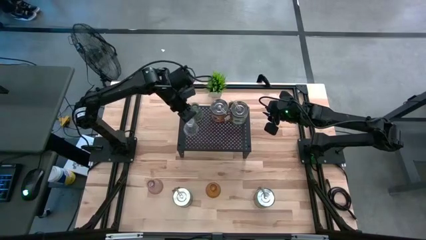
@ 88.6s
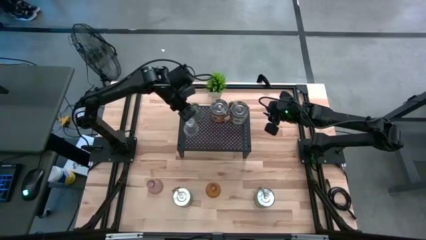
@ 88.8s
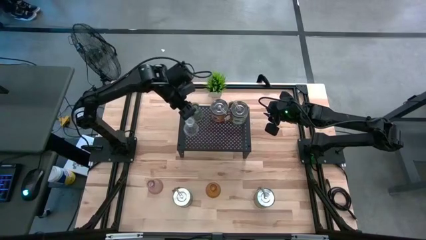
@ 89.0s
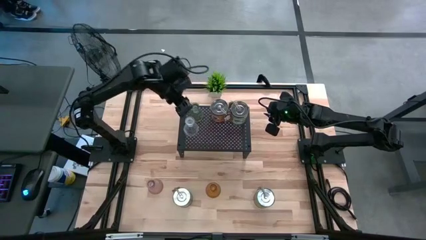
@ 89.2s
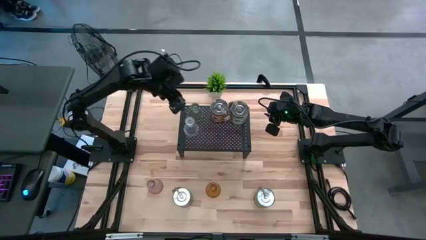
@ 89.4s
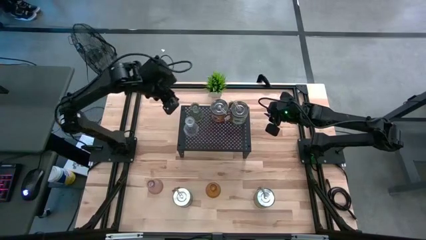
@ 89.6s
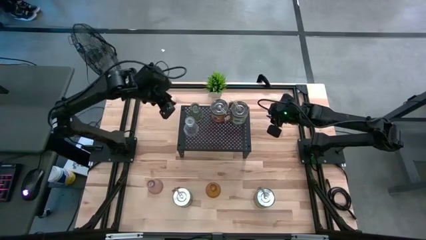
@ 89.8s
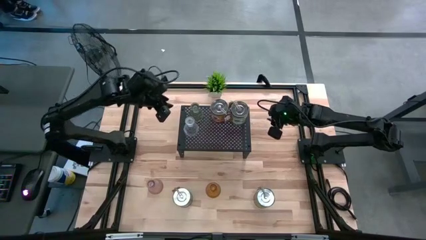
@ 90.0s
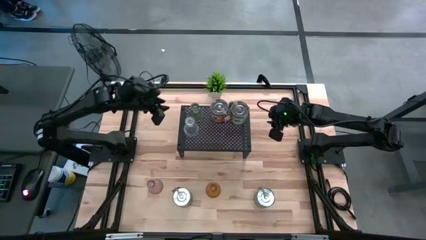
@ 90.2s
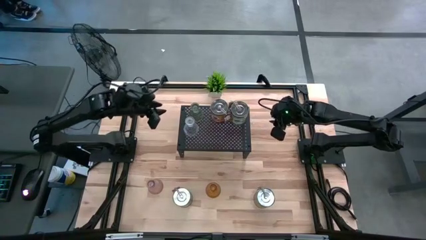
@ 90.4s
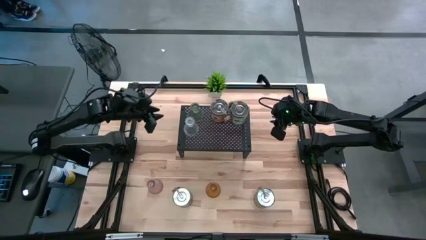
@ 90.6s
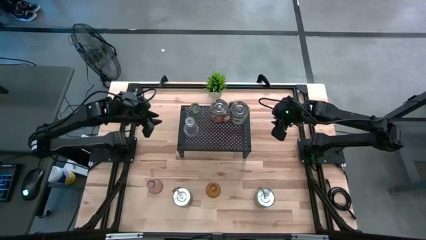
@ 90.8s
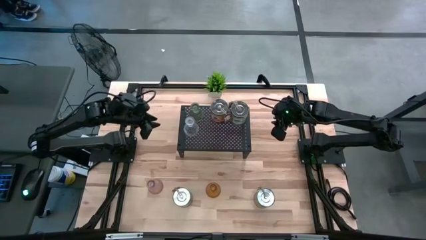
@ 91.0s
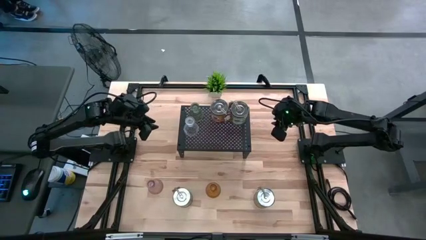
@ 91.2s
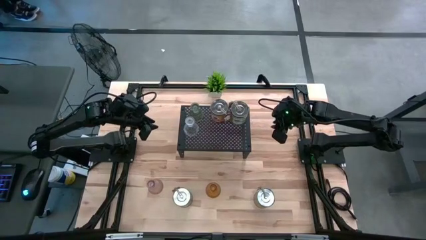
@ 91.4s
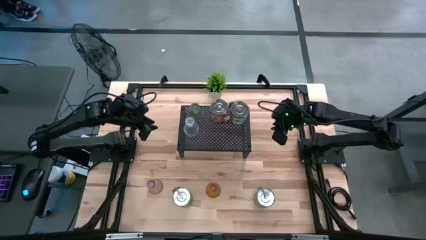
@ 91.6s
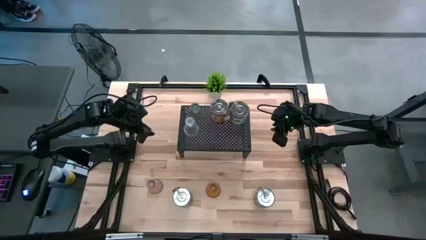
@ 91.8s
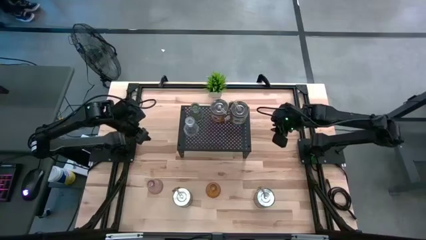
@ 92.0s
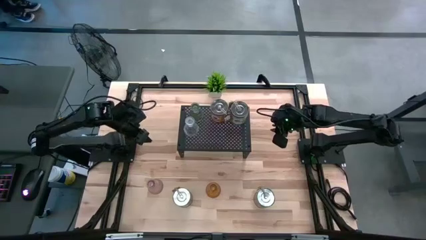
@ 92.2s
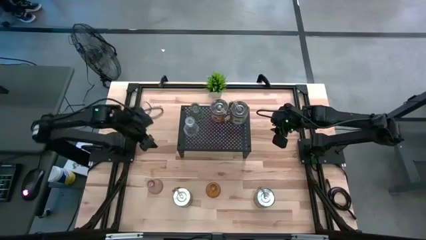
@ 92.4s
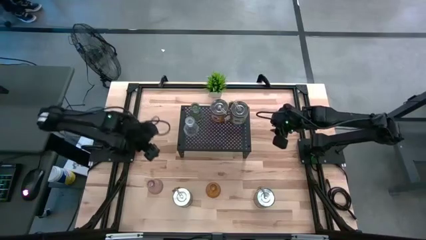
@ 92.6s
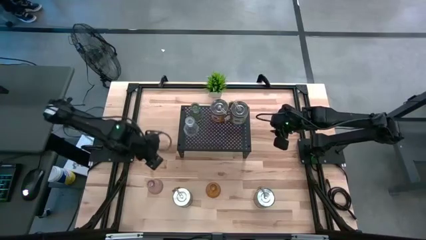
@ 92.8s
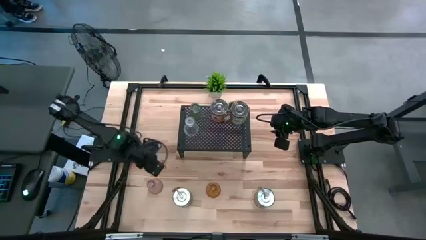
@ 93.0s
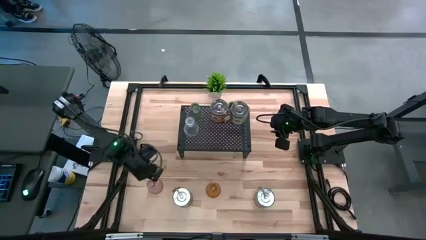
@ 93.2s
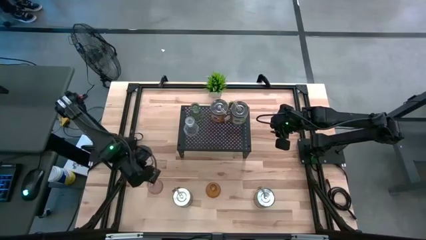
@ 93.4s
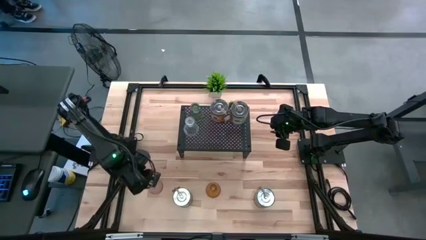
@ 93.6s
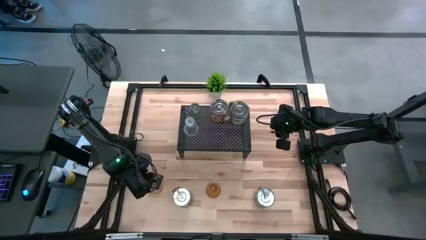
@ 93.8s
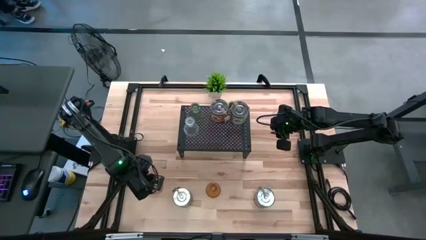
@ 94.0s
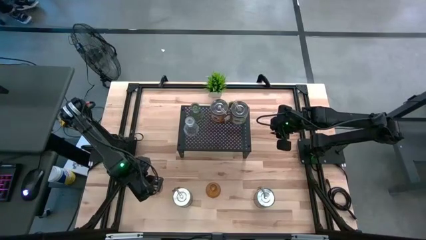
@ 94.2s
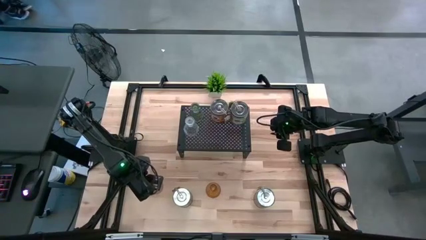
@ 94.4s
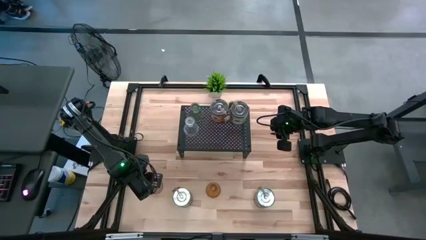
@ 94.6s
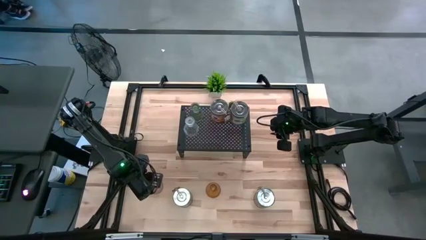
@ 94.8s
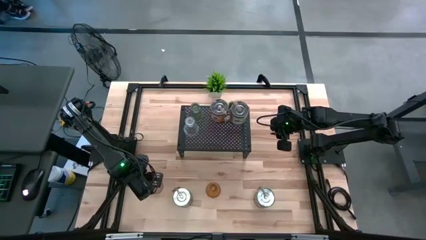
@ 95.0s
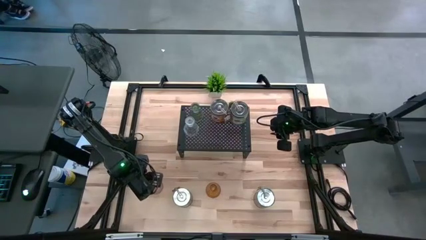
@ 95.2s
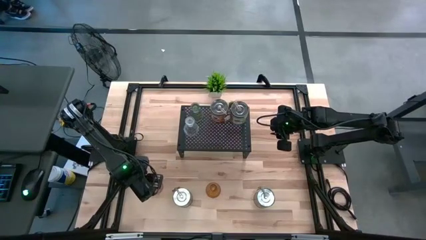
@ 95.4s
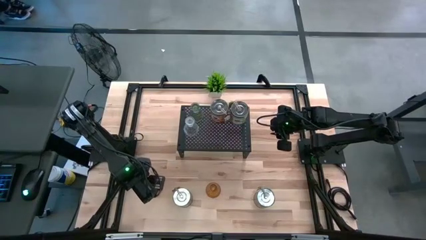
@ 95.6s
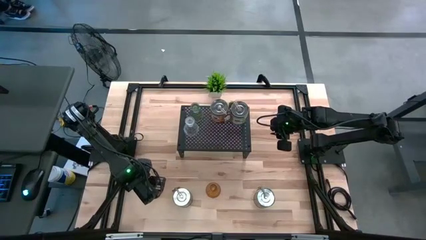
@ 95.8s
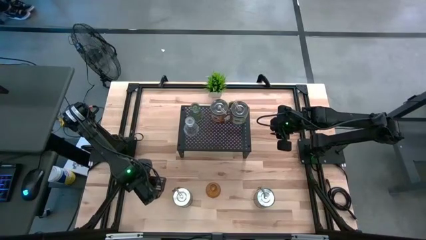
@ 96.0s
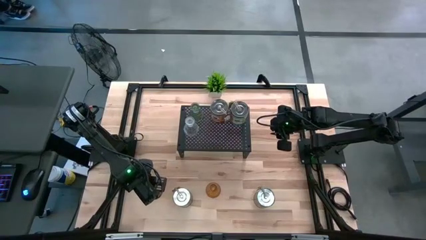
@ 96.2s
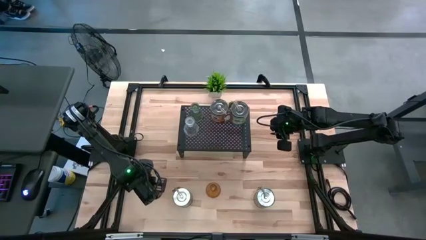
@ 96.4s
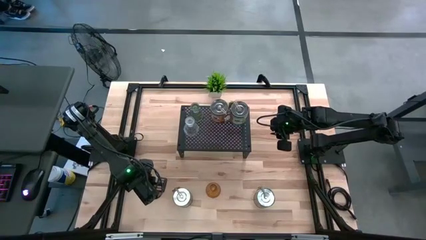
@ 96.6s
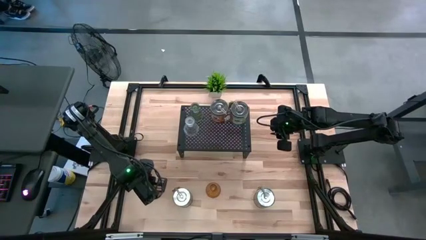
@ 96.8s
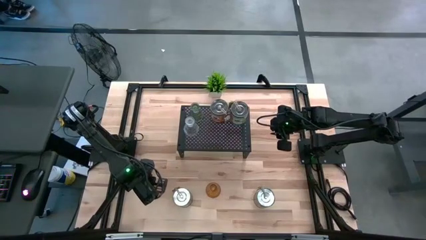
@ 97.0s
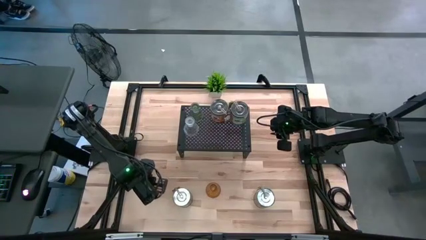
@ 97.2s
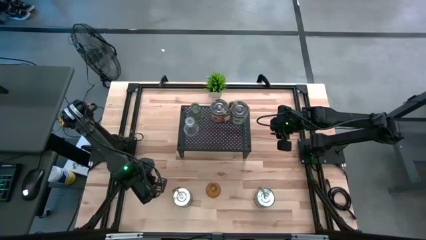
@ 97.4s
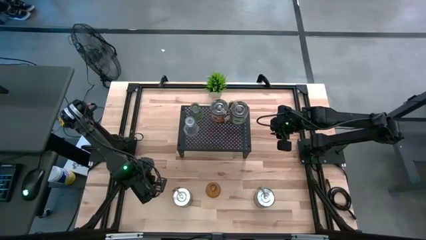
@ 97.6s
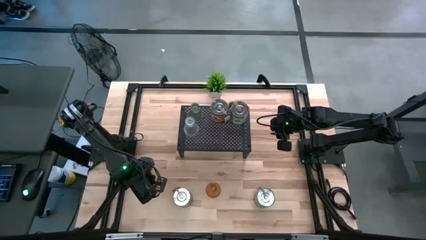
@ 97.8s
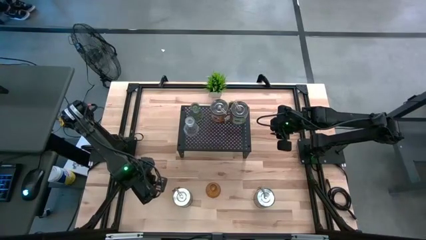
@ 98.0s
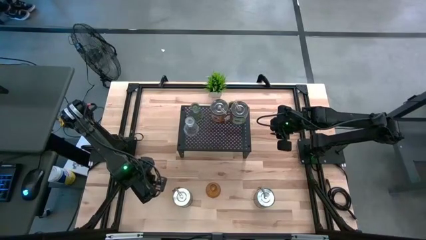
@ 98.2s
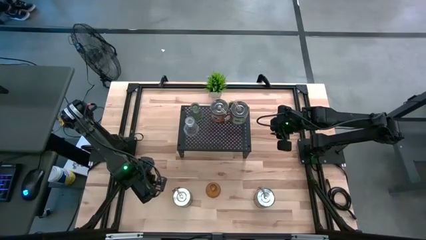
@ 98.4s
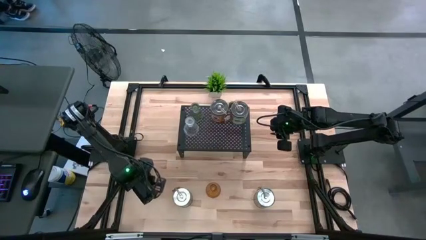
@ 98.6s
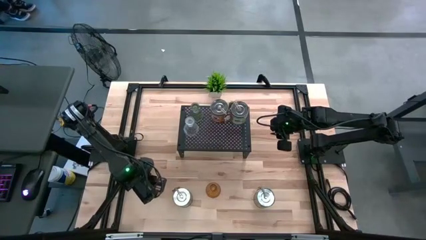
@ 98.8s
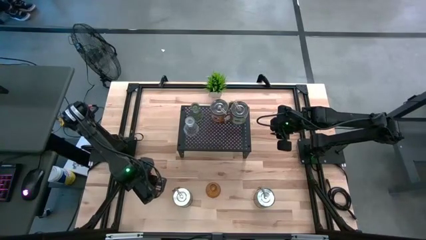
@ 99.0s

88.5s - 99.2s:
Task: Pick & Place candle stick holders
Put the pink glass candle holder on the shelf

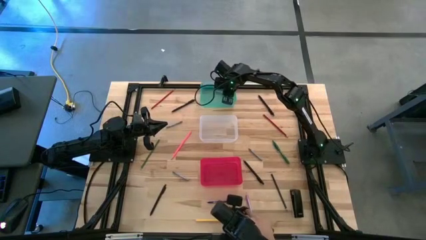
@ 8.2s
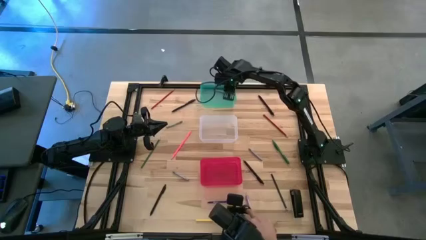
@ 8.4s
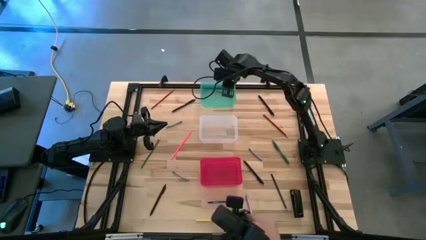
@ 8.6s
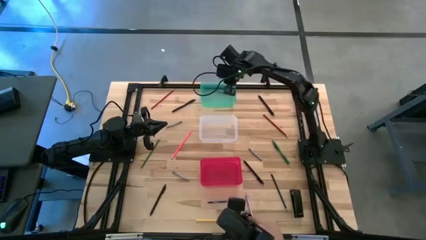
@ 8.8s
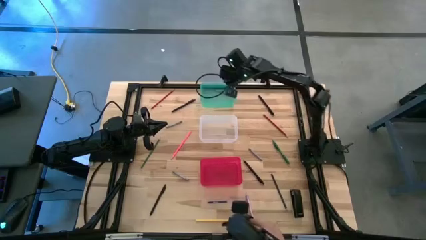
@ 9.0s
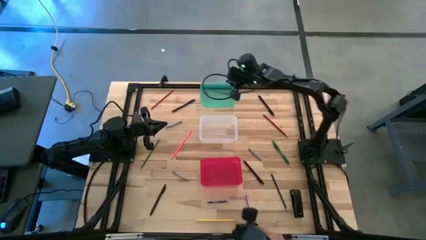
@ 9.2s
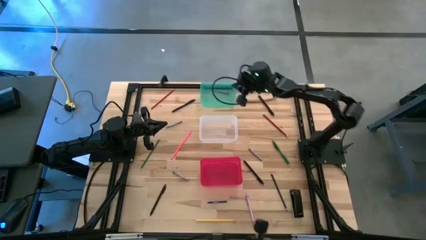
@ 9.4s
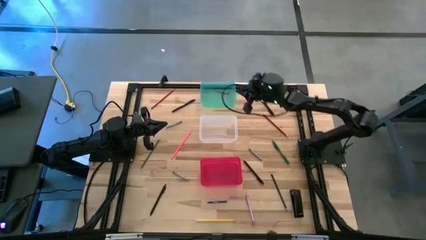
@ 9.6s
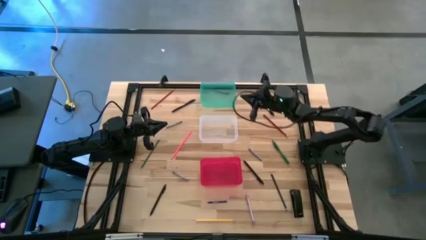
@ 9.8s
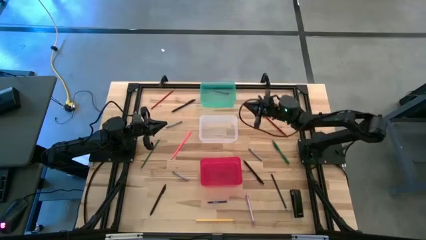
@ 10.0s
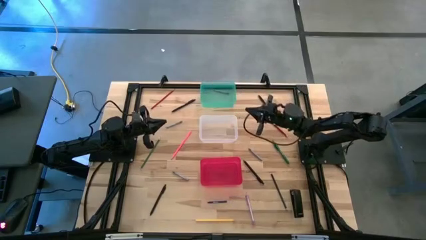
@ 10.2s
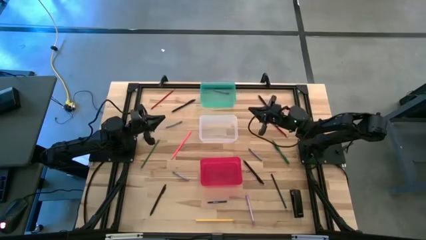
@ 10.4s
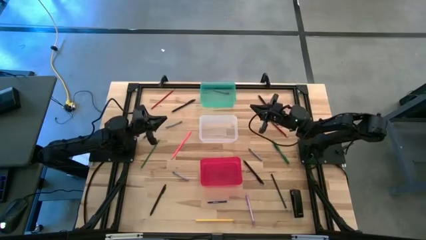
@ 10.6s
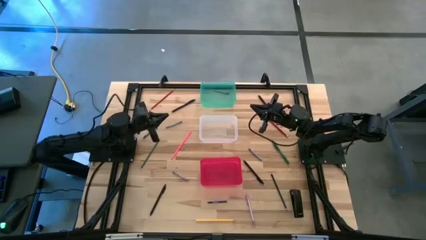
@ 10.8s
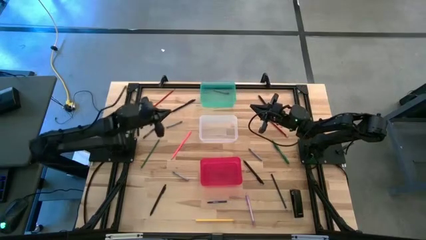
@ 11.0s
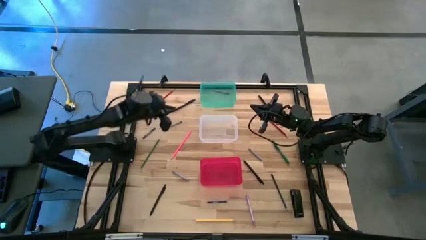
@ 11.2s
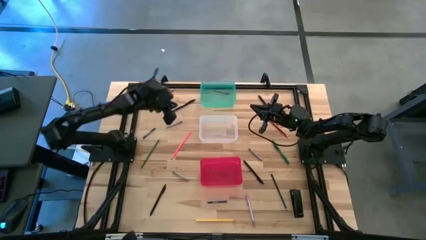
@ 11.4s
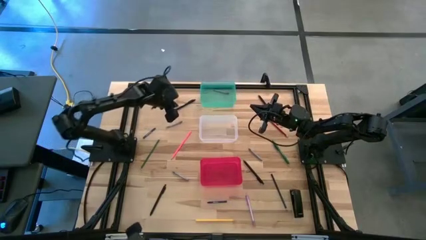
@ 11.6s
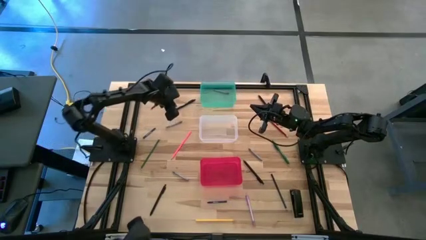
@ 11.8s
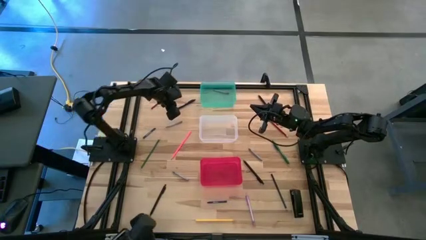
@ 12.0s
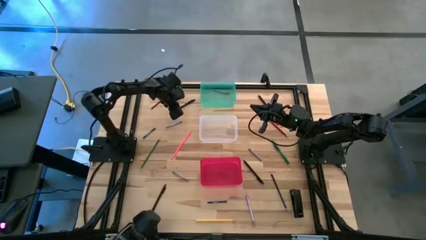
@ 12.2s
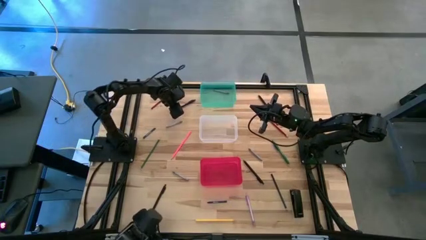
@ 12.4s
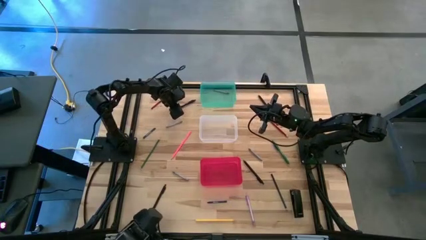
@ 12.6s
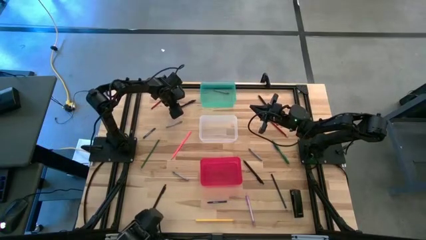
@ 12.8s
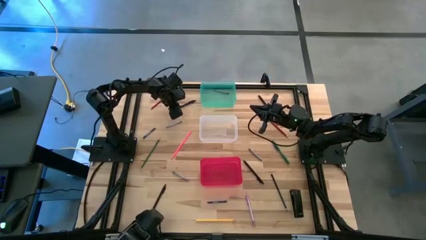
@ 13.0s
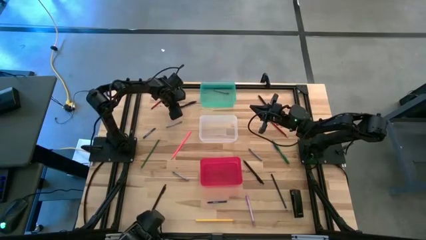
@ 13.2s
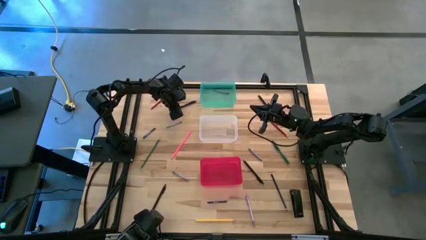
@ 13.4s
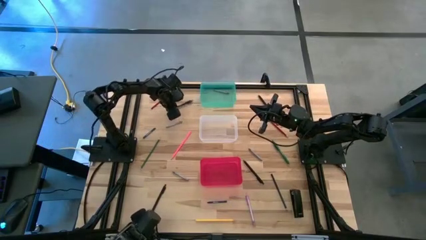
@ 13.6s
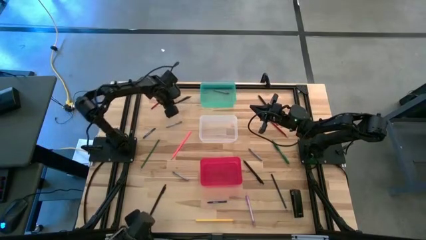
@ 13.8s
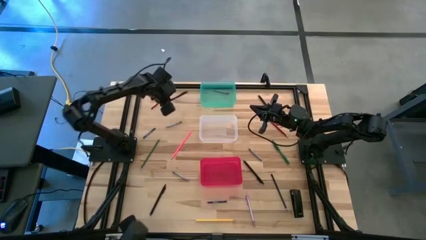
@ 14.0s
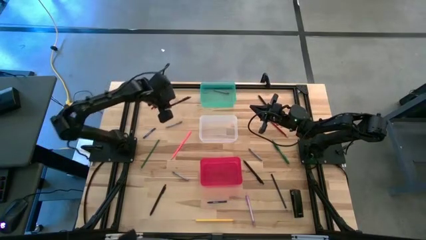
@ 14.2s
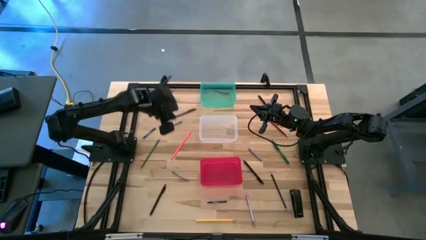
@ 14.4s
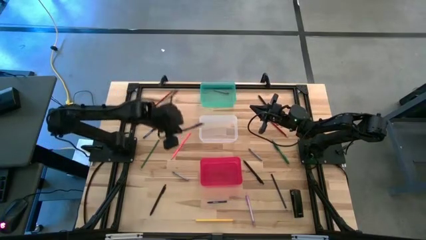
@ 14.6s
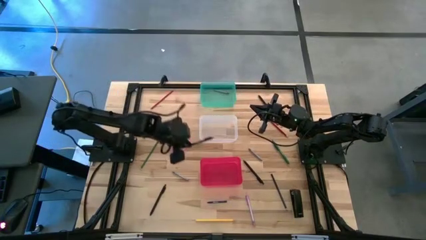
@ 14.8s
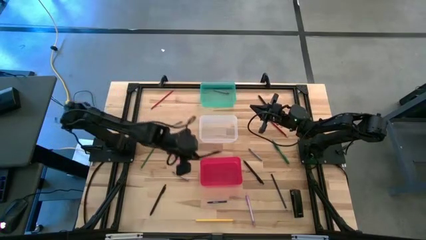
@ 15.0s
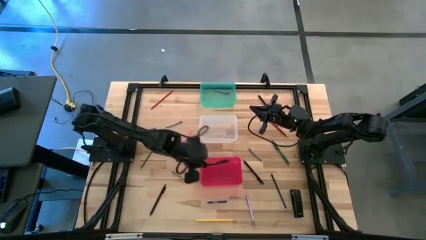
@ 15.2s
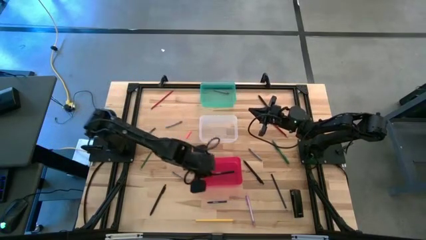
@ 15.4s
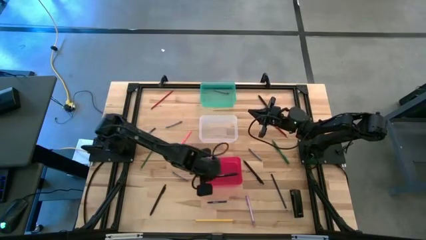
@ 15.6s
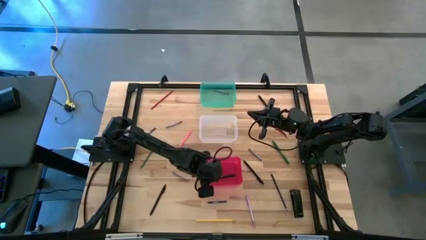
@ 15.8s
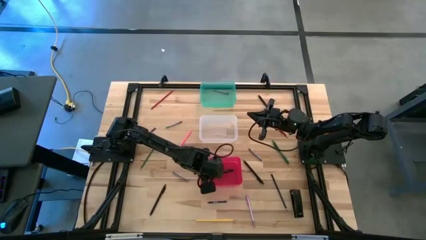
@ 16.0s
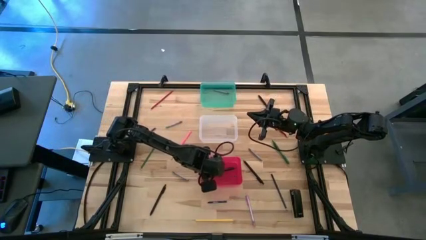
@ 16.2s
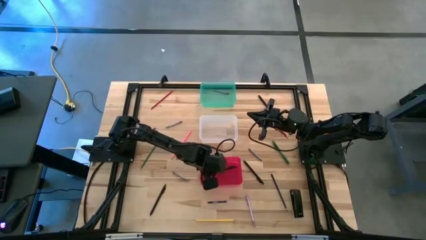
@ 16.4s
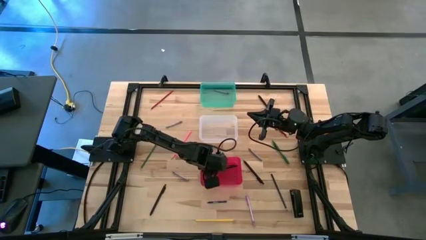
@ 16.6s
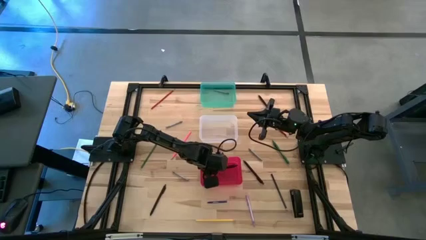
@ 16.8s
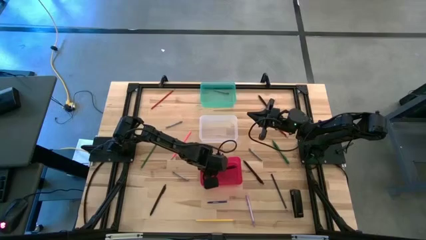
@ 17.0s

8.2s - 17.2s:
Task: Sort crayons/erasers/pens/pencils in bins
Put the top left black pen into the red bin
